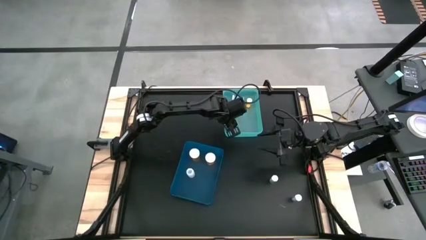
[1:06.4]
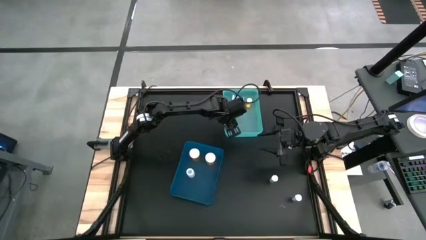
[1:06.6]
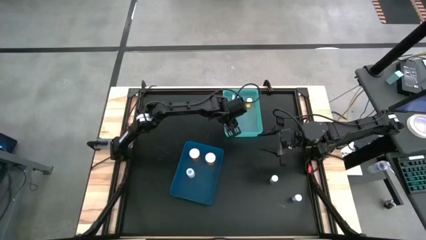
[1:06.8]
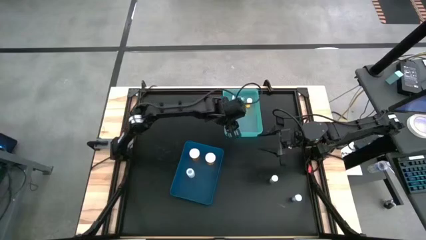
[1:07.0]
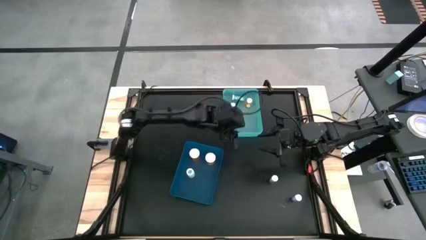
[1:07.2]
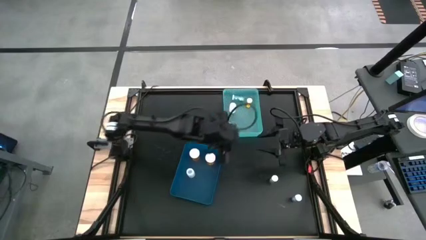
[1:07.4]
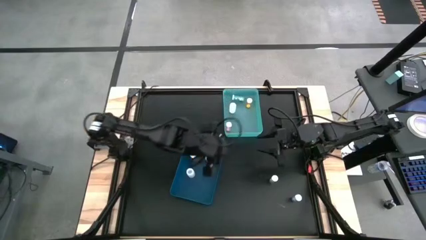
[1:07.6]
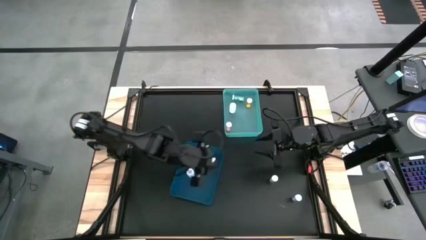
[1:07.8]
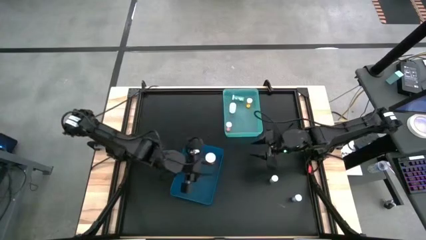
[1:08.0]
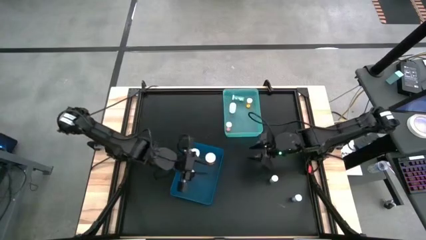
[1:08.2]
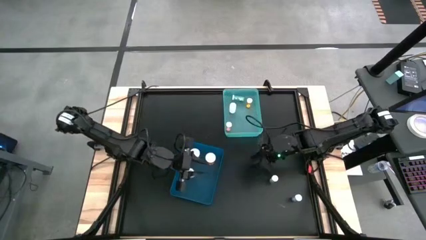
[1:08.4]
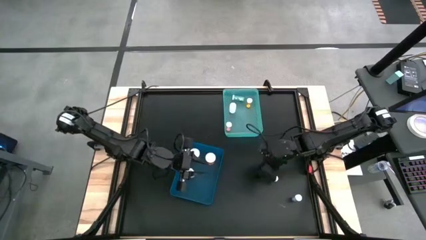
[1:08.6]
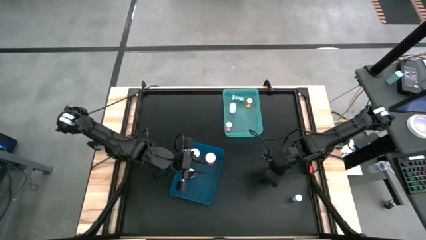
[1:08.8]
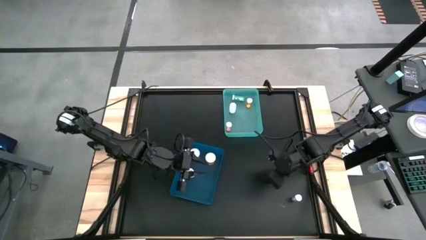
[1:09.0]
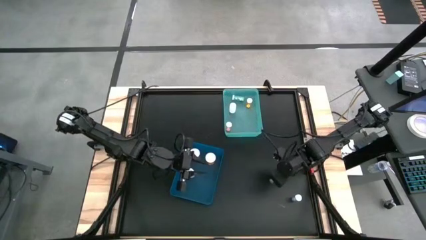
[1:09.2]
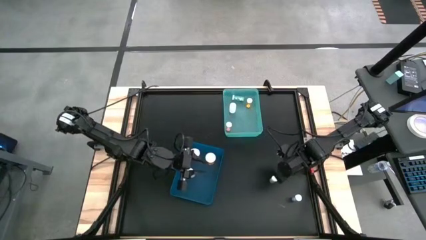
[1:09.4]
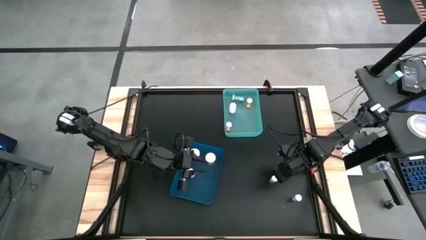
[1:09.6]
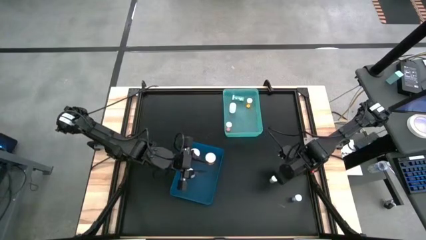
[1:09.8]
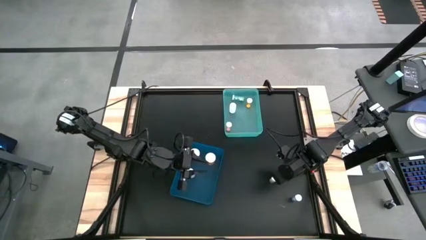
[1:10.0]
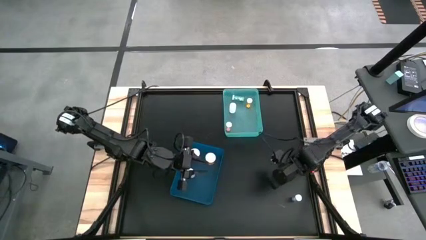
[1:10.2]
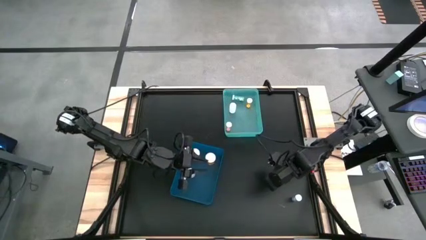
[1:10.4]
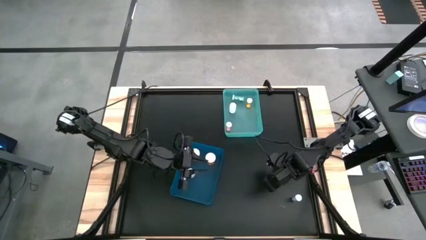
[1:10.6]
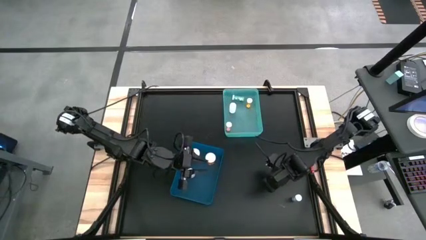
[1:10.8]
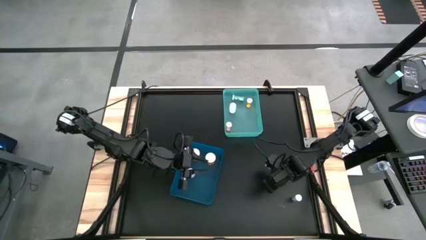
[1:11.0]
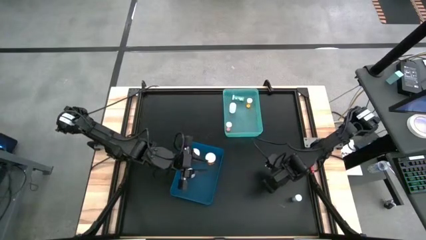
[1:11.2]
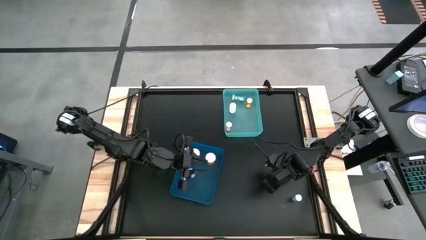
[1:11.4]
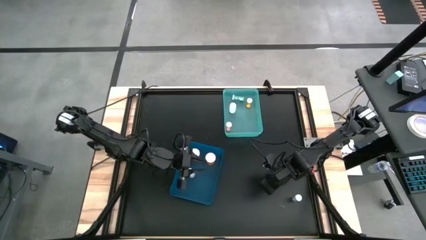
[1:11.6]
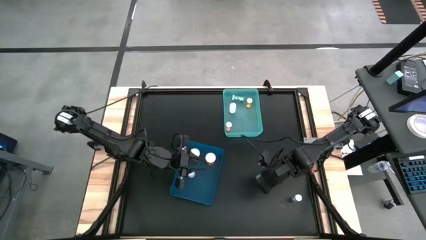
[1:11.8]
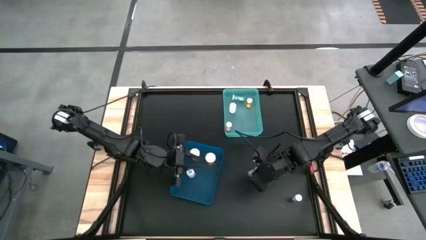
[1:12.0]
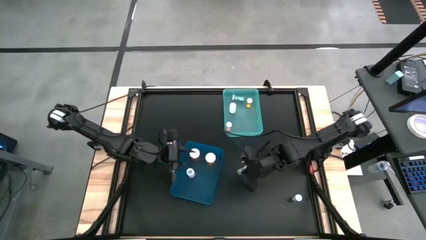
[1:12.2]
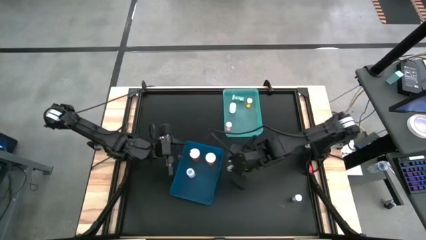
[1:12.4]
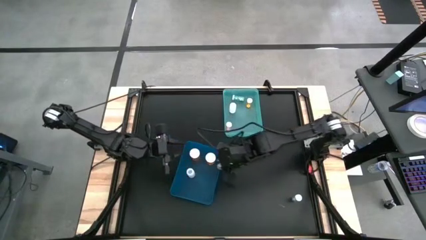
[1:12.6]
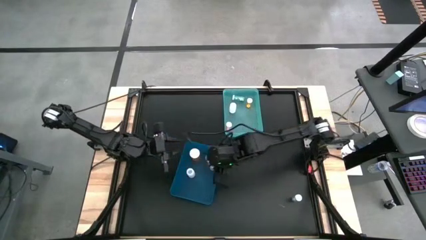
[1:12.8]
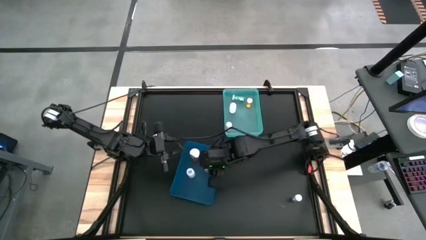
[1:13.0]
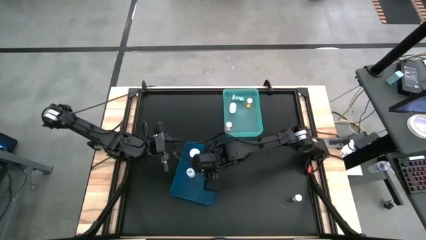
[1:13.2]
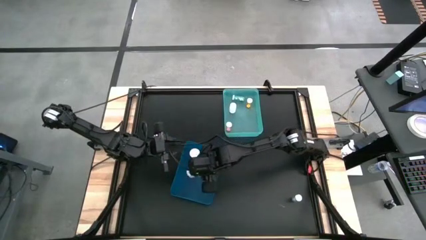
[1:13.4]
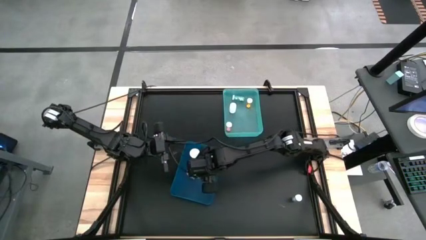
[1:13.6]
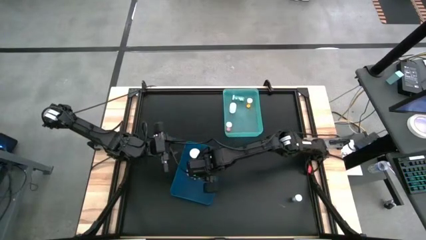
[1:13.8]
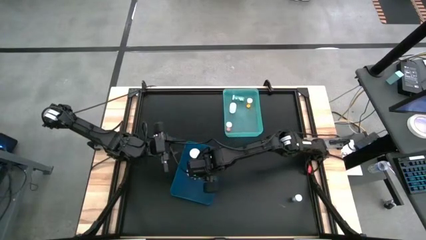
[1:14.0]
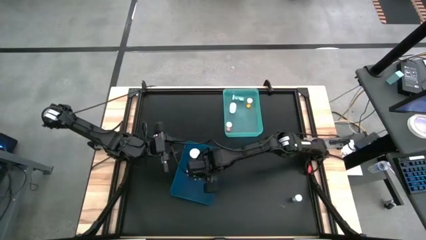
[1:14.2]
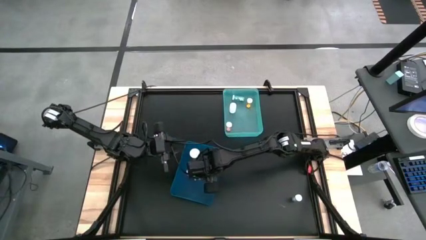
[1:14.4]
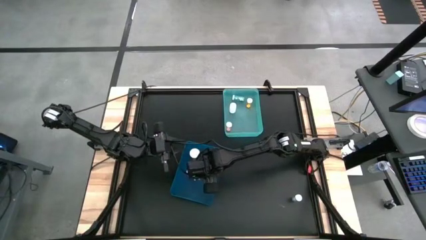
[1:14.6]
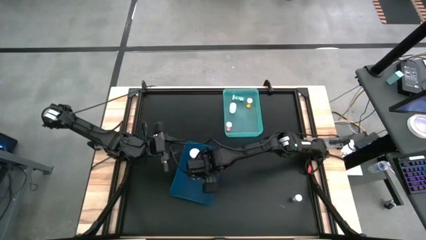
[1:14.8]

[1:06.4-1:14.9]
Task: Pick and place medicine bottles into bin by pill shape (circle, oval)
Put the green capsule bottle into the blue bin

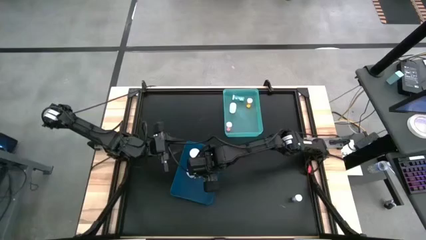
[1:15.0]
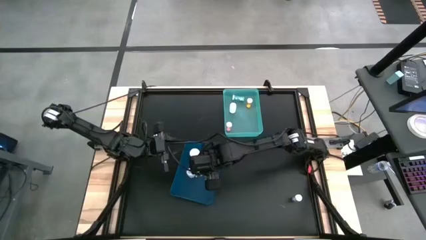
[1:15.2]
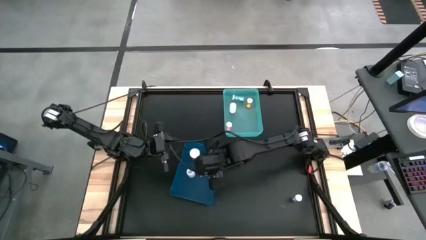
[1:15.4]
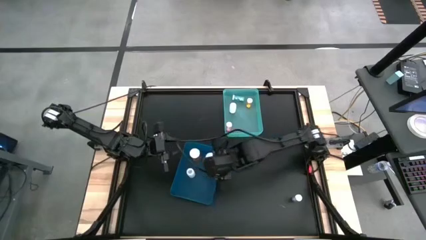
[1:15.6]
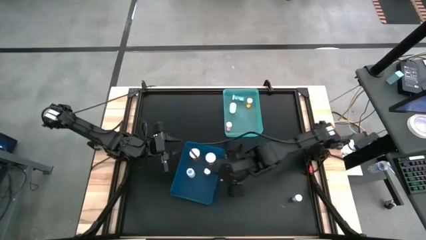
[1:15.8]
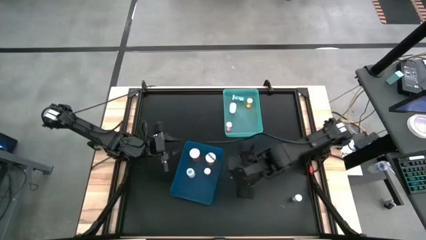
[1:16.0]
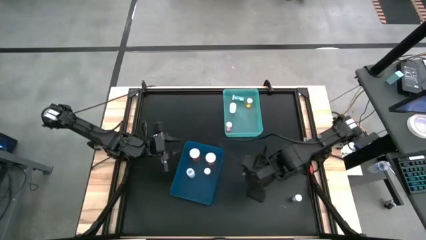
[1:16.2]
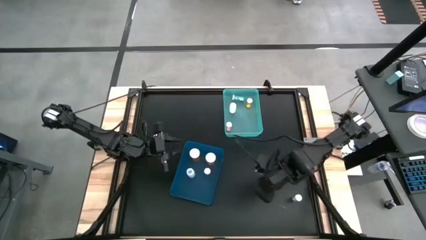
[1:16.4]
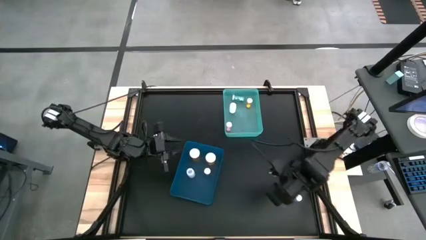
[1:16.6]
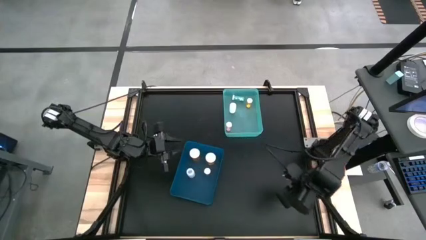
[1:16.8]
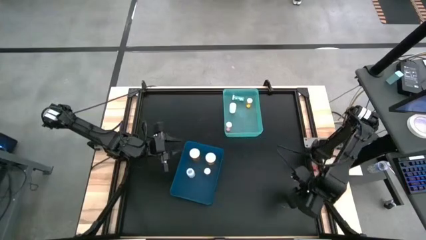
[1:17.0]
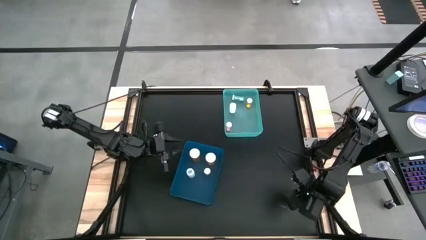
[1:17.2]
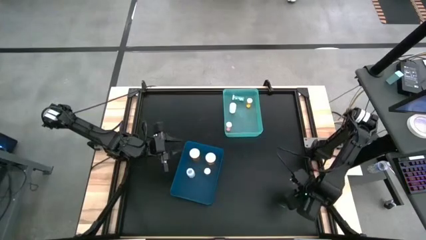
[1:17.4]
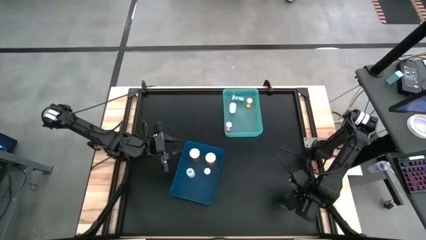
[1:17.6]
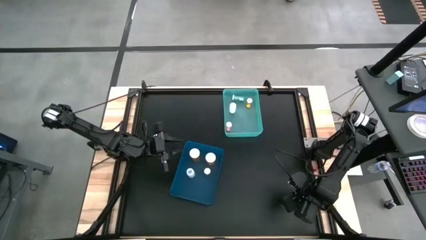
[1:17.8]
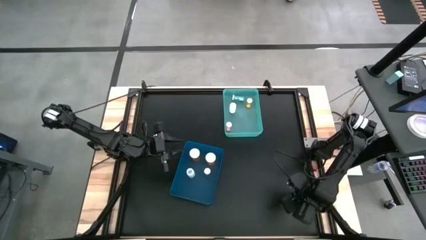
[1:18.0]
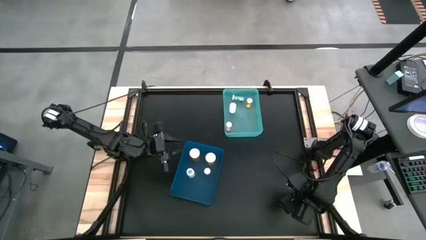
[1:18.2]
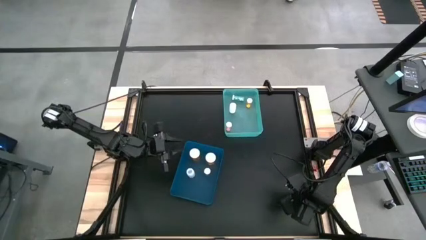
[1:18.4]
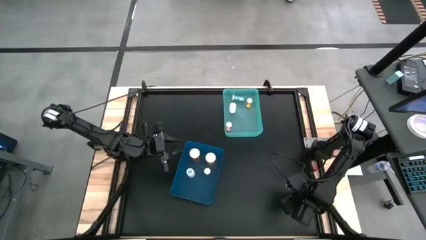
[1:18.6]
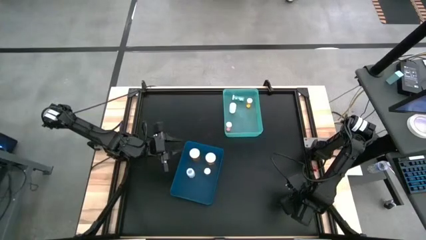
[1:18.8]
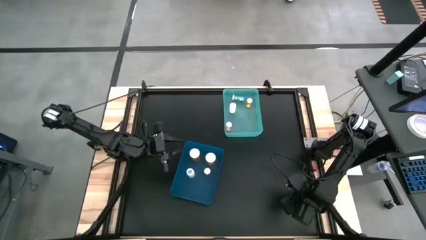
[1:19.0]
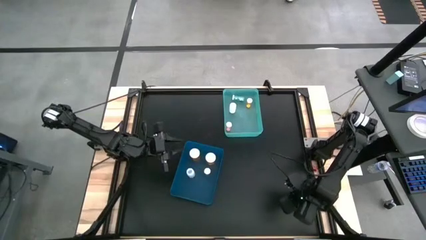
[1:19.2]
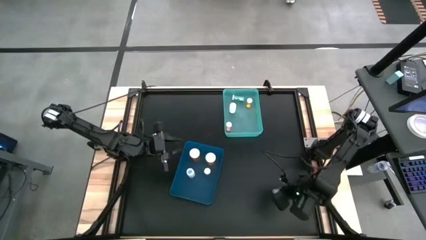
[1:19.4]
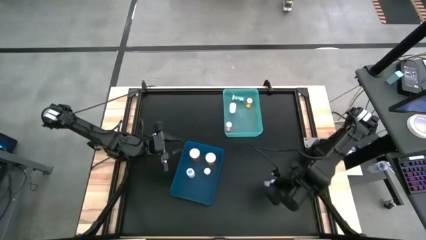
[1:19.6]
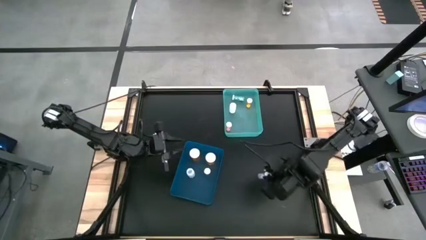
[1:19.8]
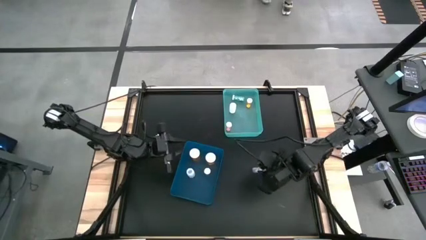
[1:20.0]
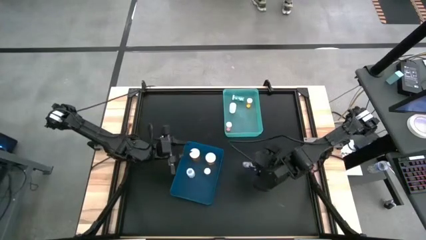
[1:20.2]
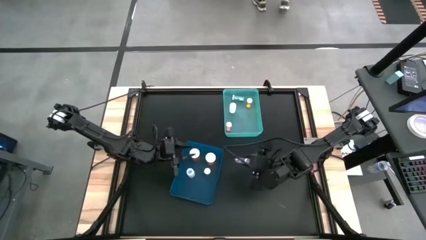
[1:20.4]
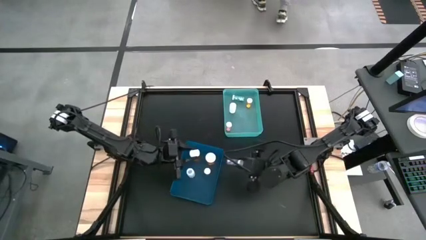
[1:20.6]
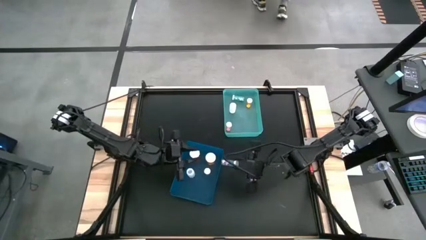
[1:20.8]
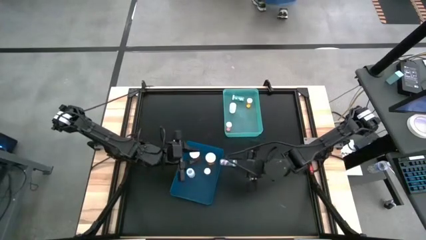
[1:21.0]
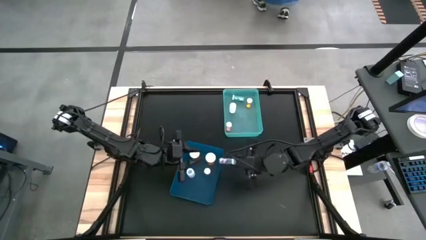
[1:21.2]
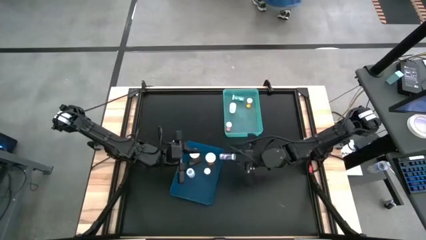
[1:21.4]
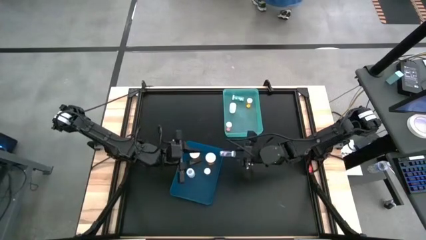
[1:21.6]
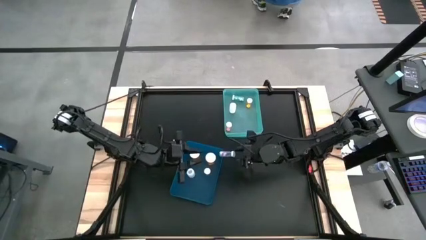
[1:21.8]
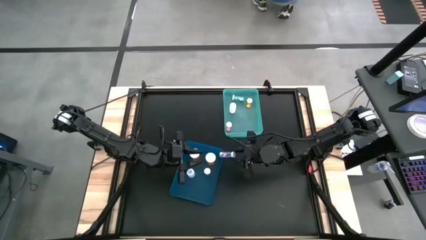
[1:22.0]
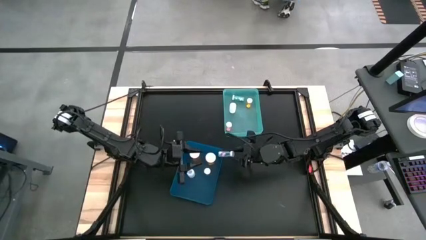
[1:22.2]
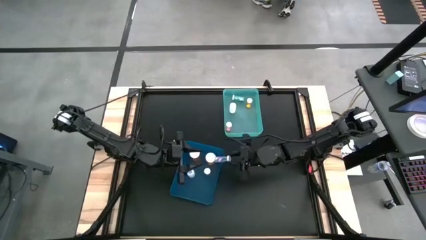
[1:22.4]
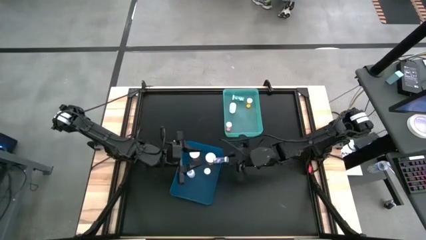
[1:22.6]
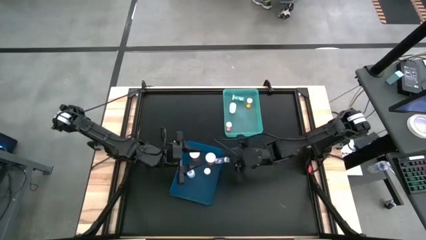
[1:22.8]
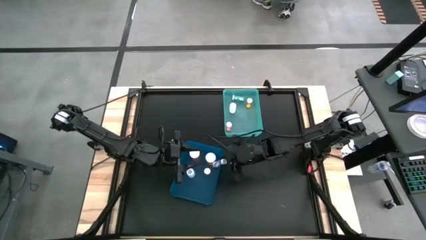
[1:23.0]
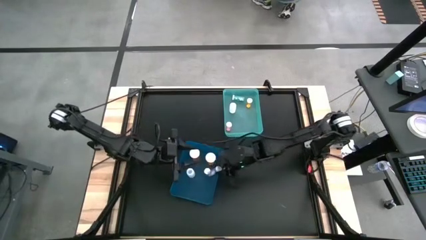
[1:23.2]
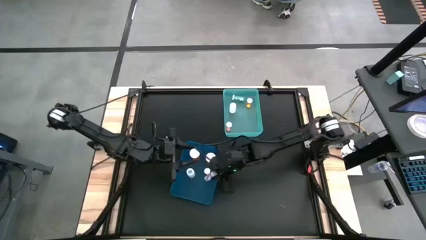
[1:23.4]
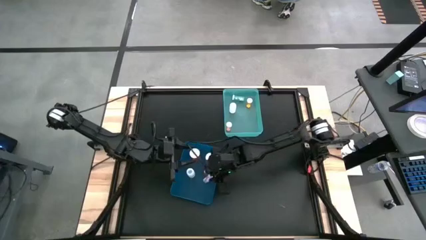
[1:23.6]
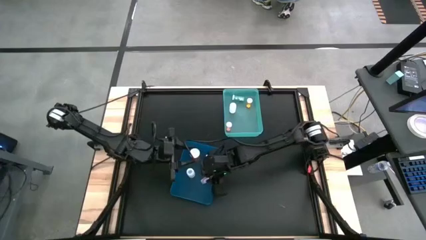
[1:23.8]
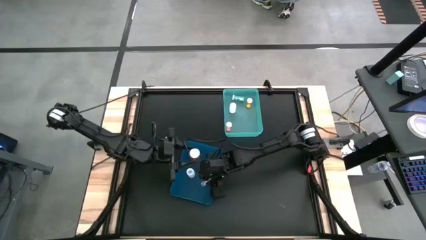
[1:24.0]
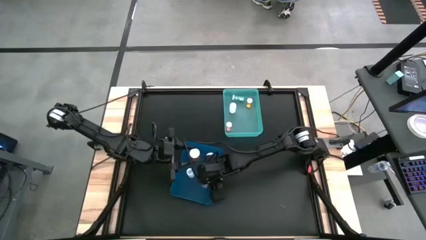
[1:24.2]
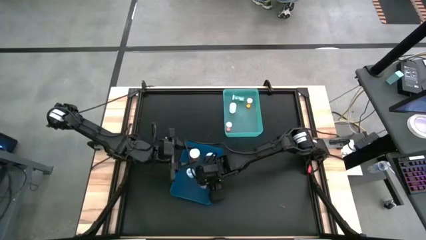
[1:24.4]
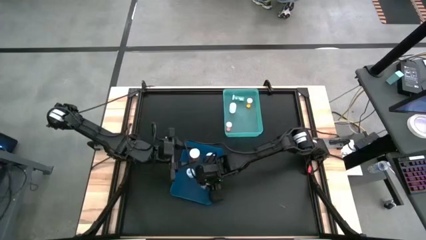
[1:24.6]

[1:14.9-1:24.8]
Put the blue capsule bottle into the blue bin
